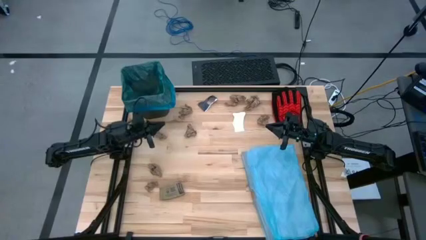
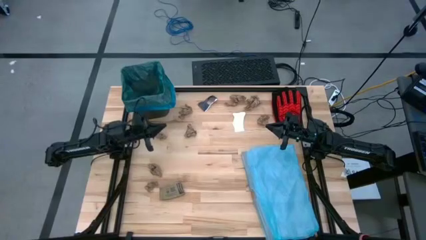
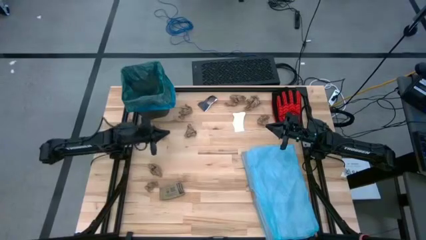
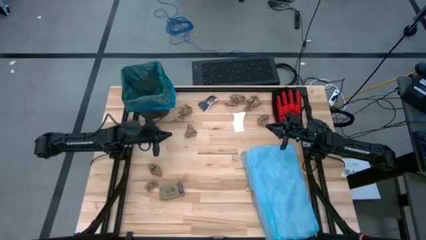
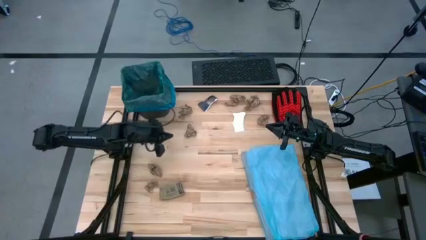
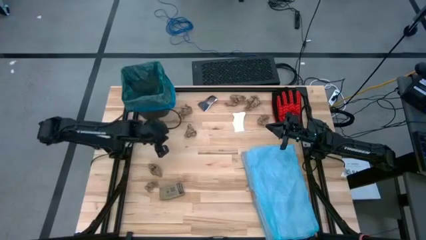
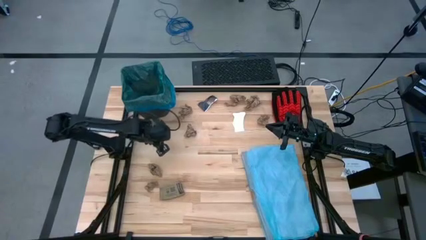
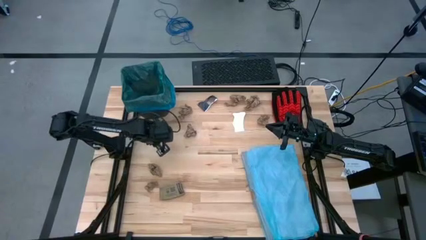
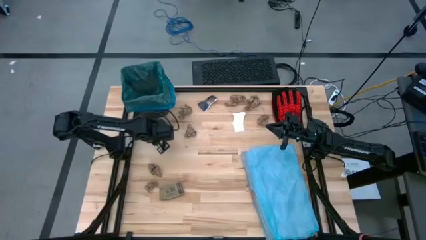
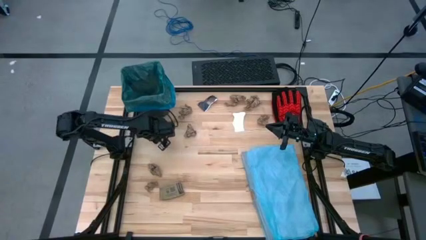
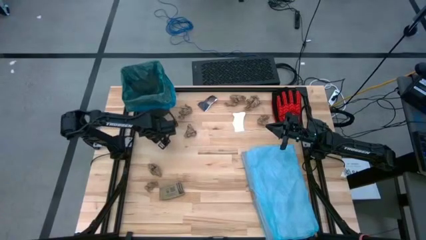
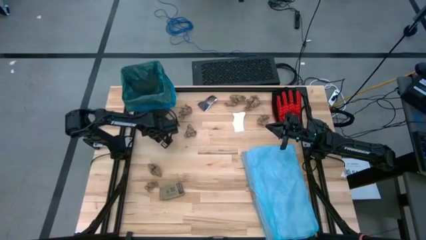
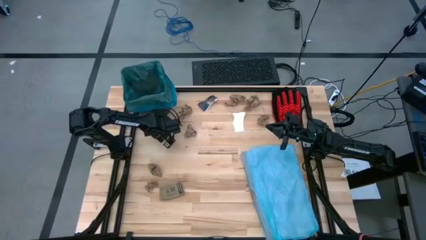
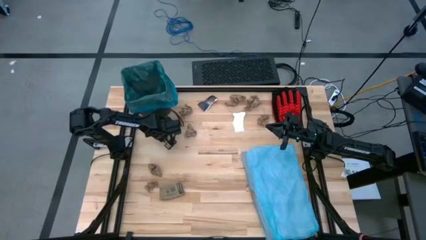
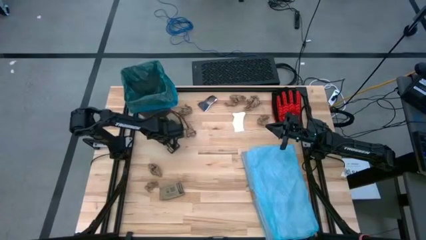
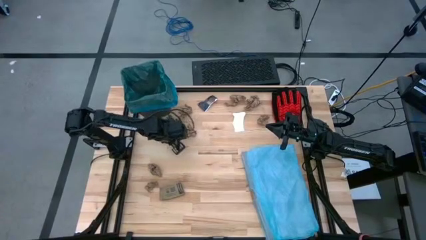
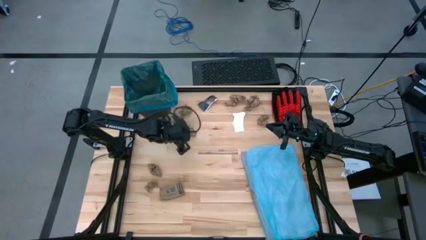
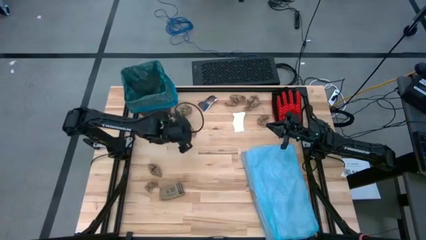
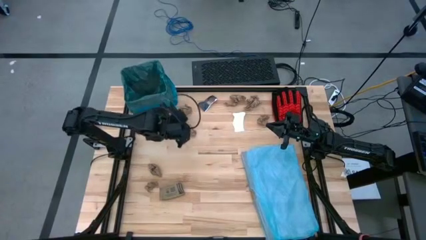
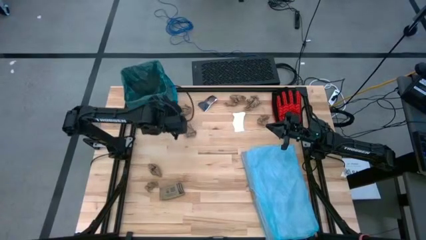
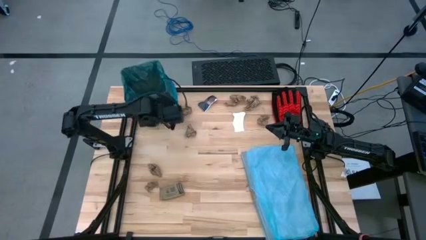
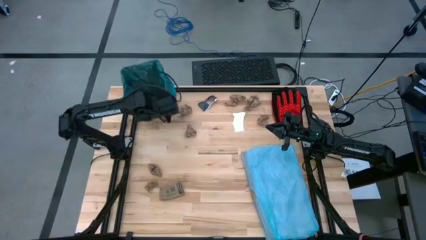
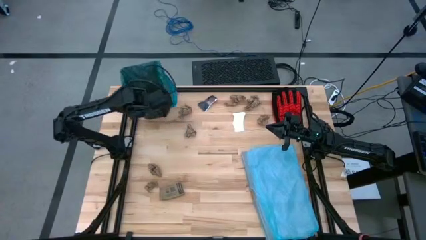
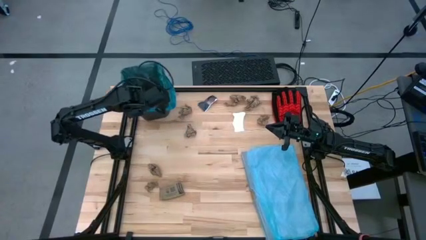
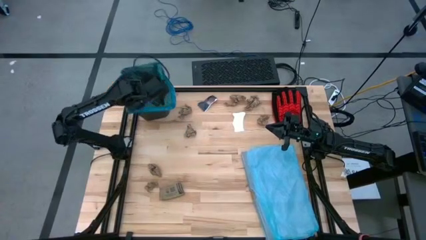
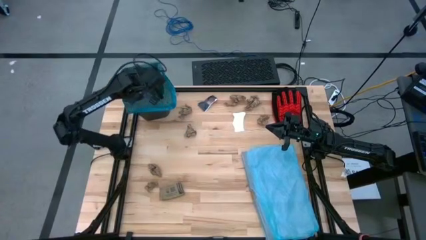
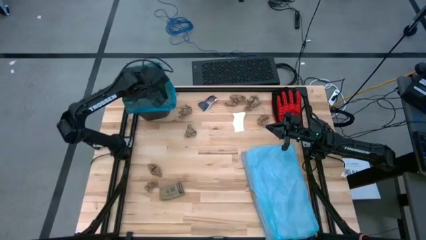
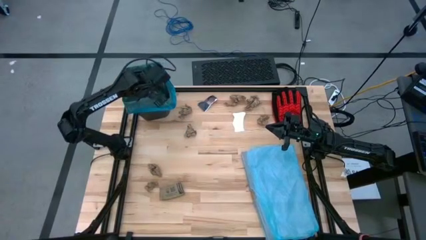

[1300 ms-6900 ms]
Task: place trash/remove bag and relplace
Put the brown napkin into the trash bin

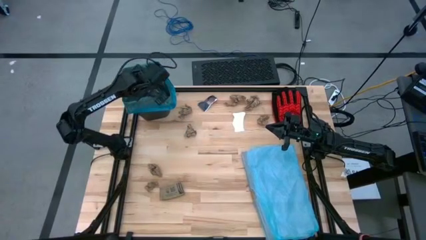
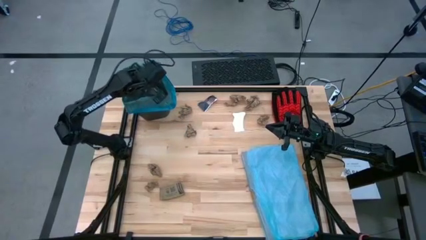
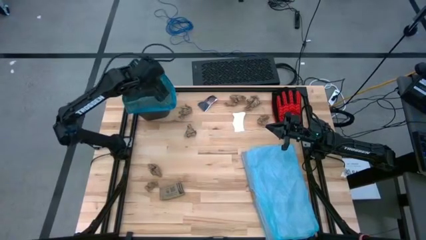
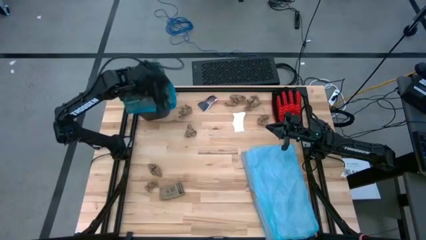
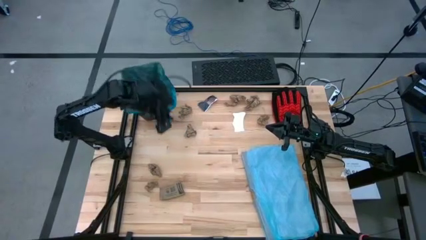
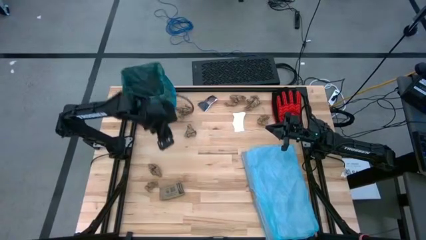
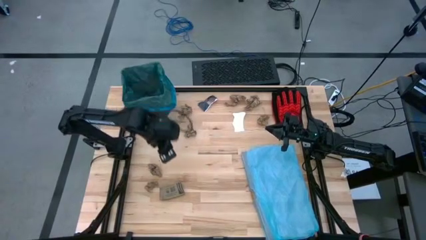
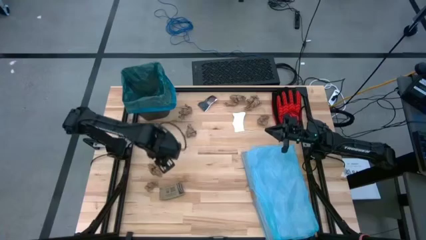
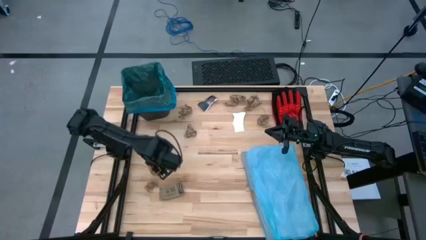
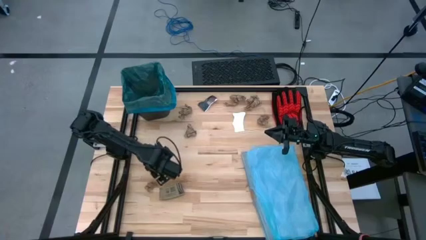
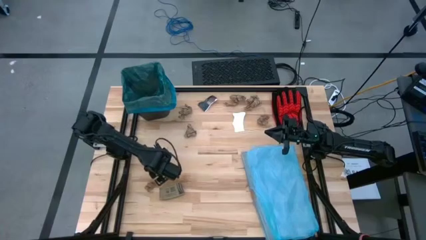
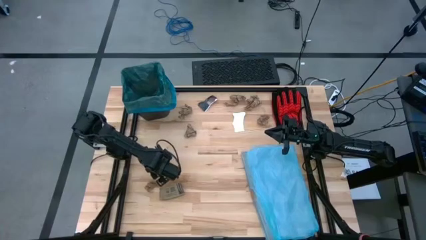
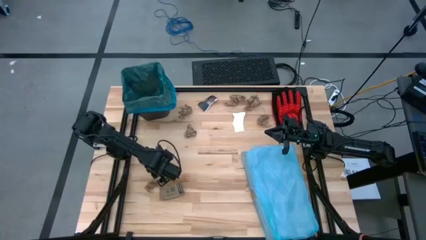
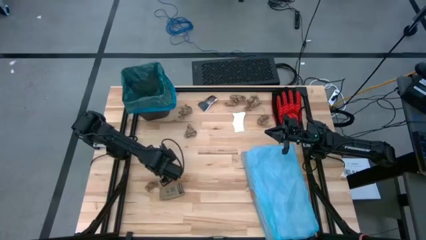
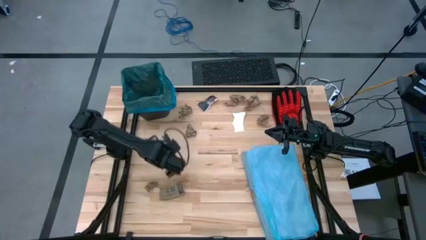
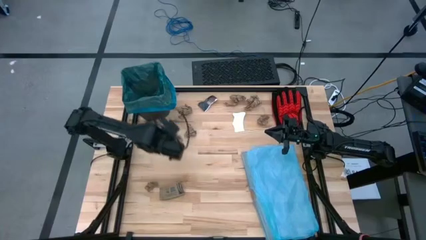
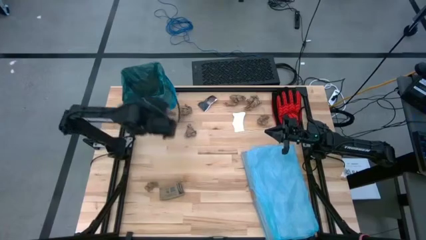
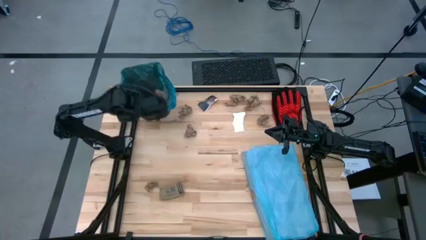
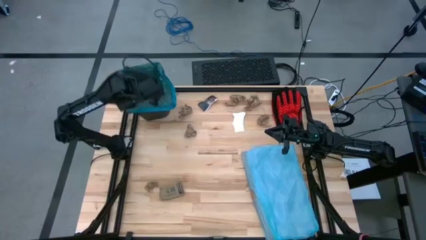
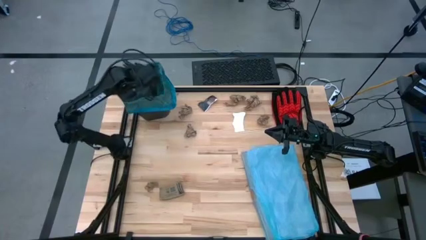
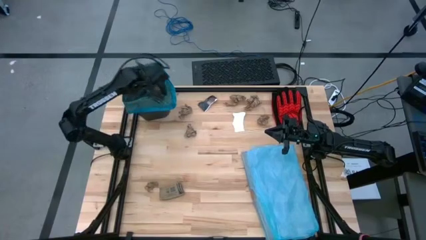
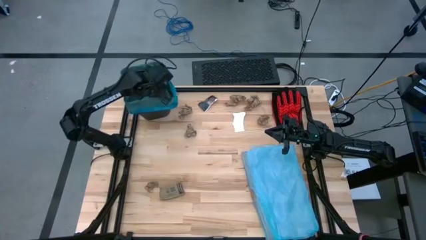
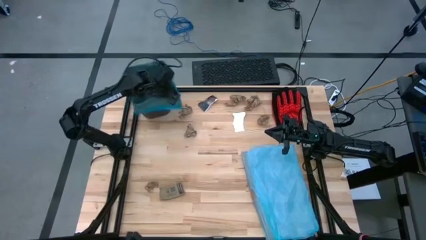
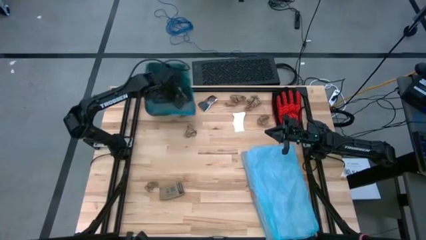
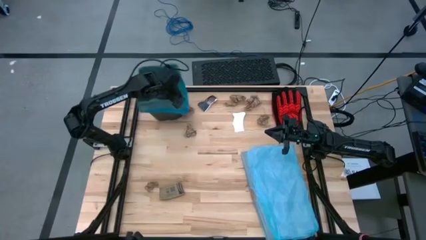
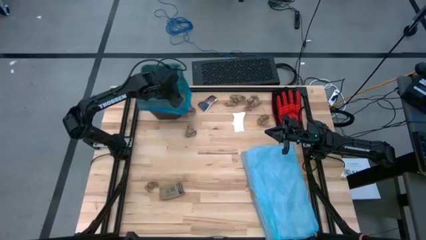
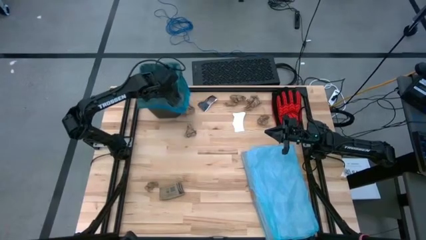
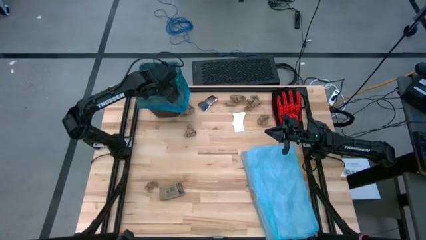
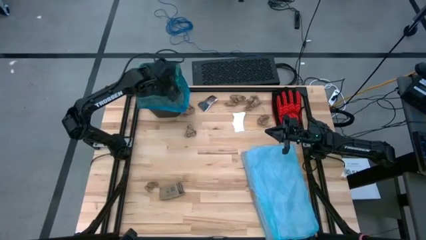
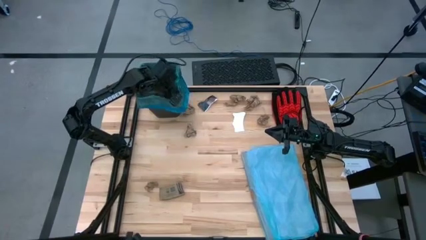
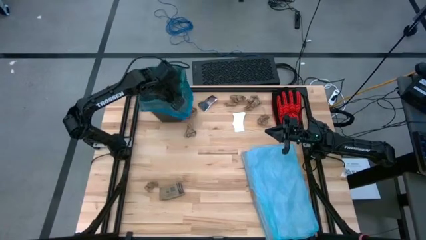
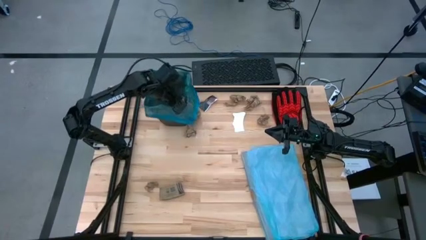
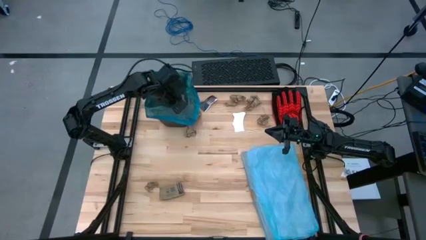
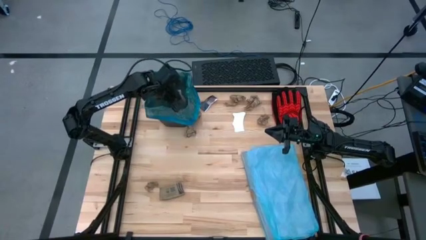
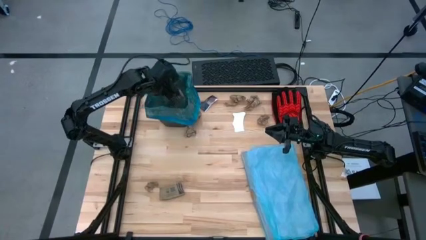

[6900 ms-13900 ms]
Put the brown napkin into the trash bin

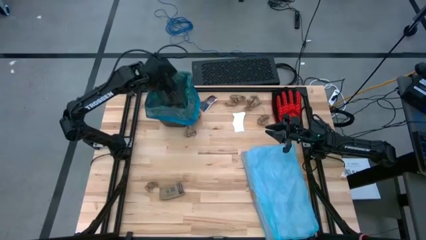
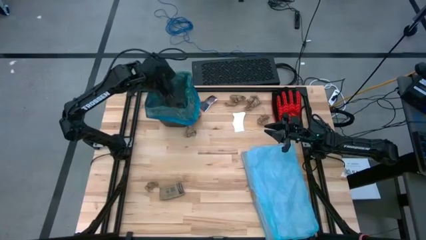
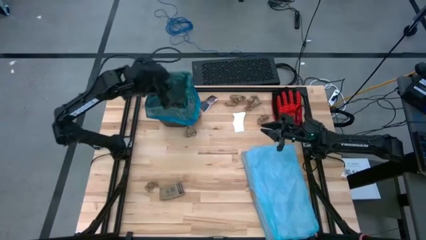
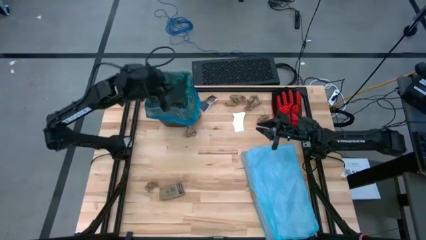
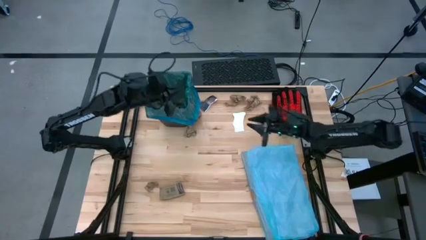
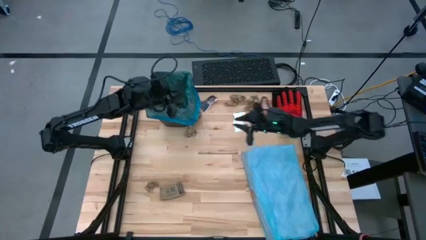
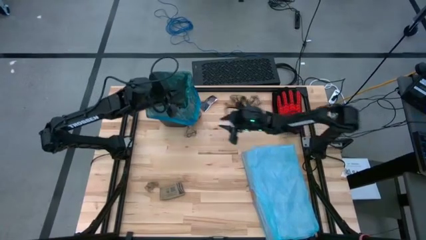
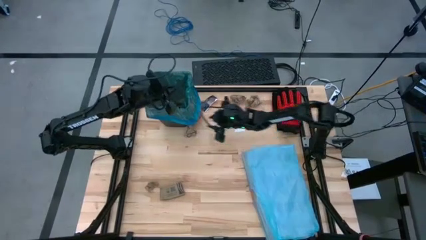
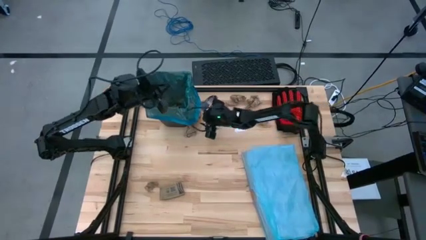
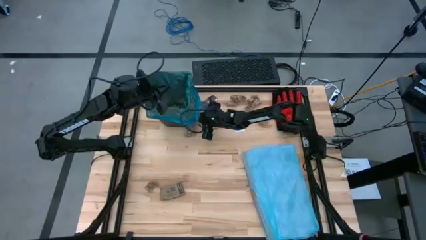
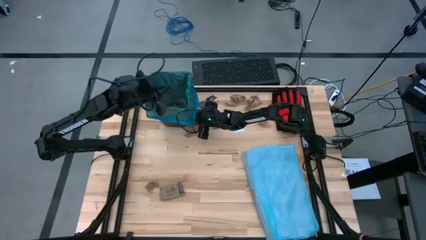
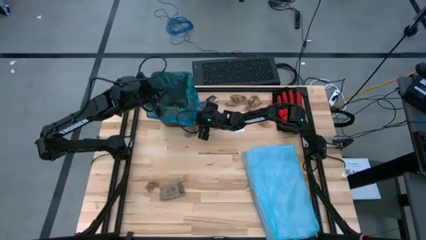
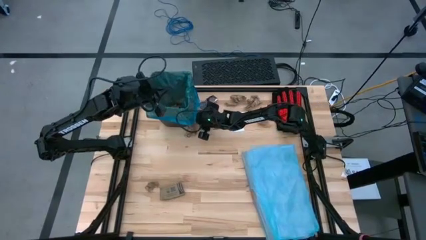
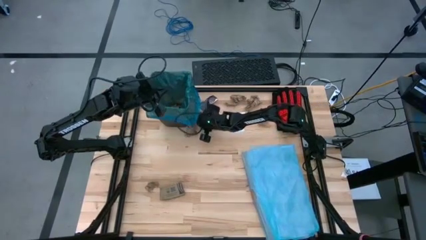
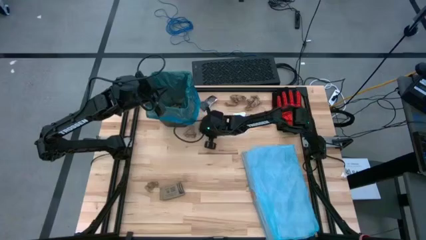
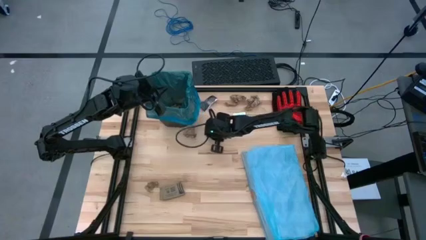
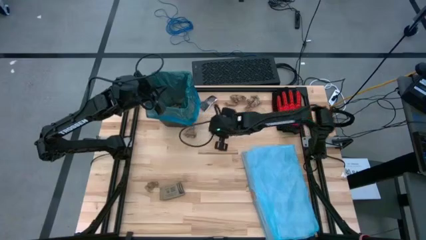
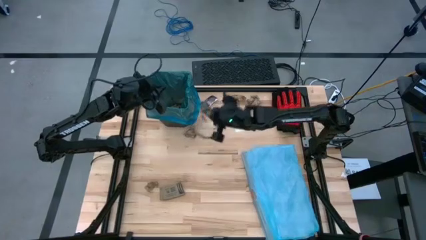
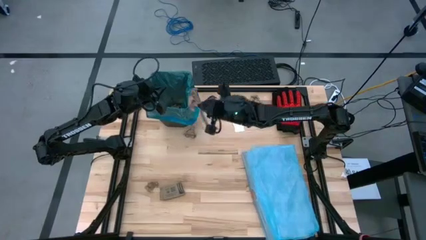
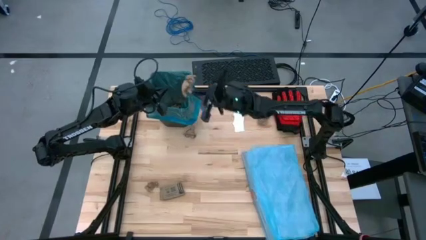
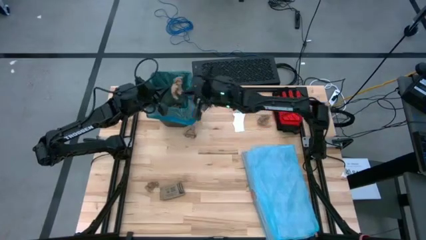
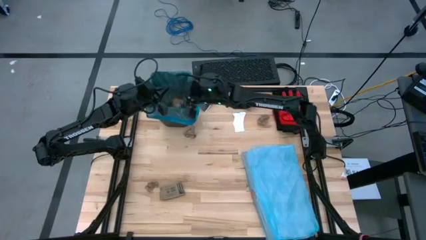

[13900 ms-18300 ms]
Put the brown napkin into the trash bin
